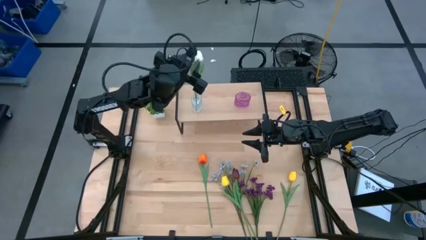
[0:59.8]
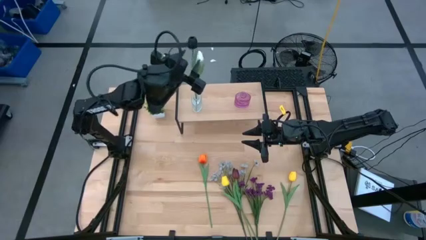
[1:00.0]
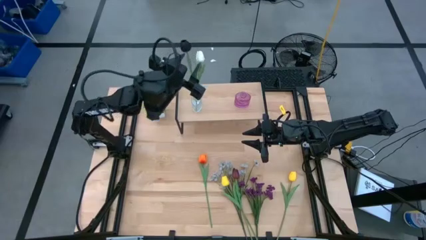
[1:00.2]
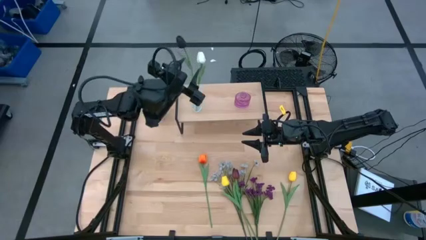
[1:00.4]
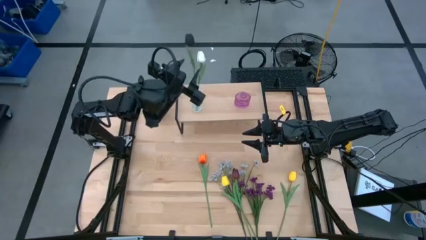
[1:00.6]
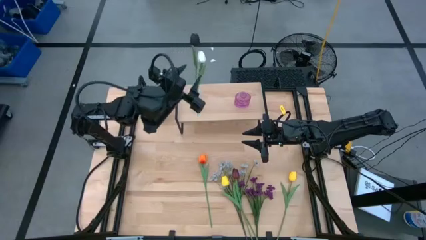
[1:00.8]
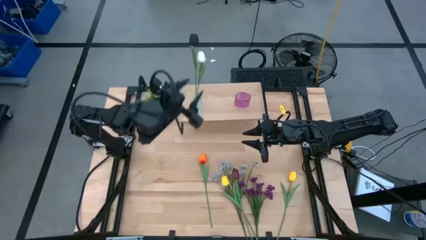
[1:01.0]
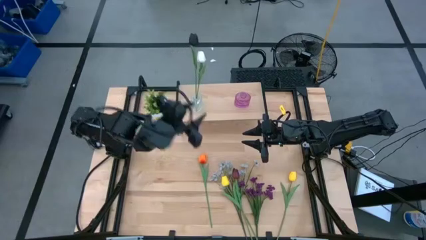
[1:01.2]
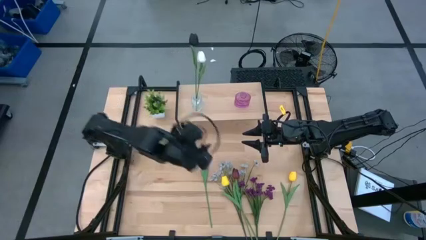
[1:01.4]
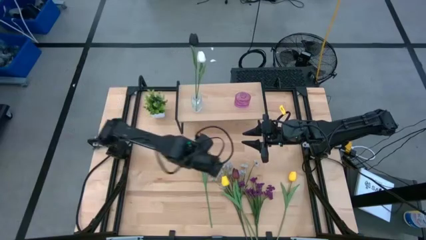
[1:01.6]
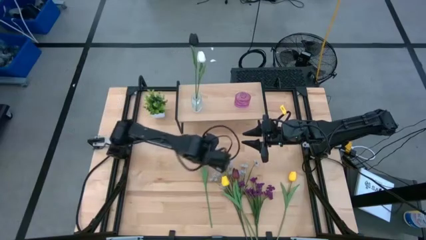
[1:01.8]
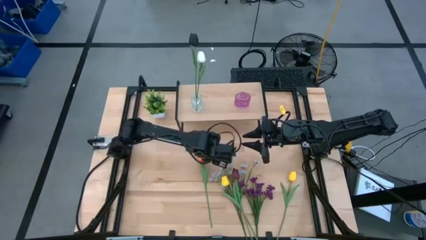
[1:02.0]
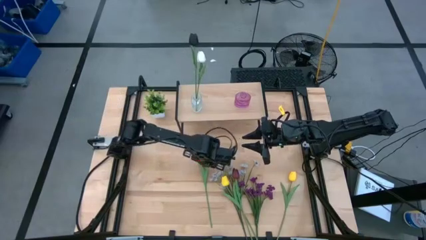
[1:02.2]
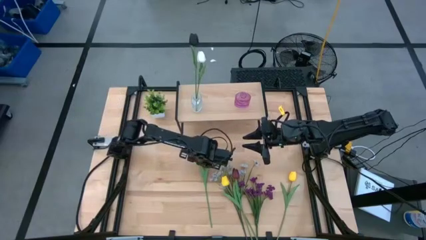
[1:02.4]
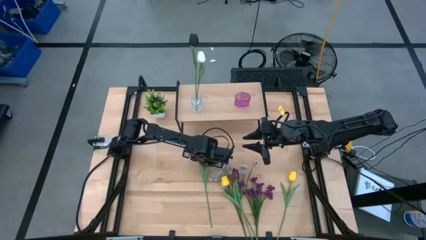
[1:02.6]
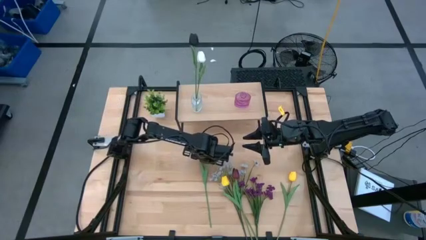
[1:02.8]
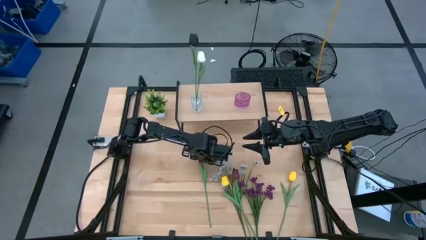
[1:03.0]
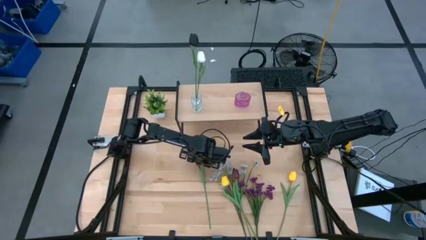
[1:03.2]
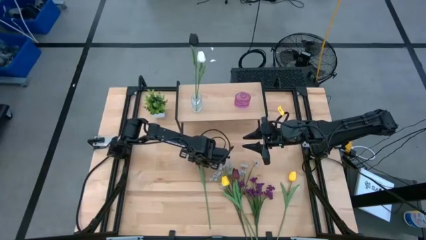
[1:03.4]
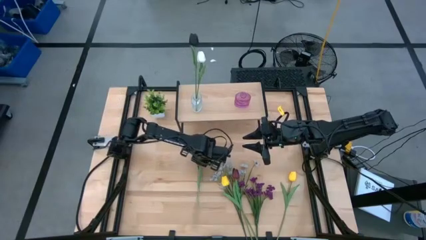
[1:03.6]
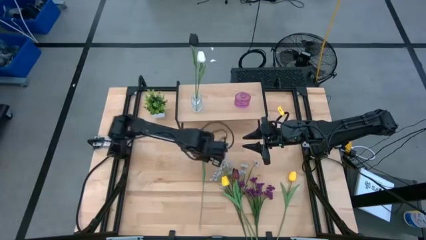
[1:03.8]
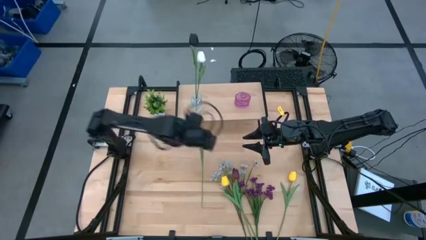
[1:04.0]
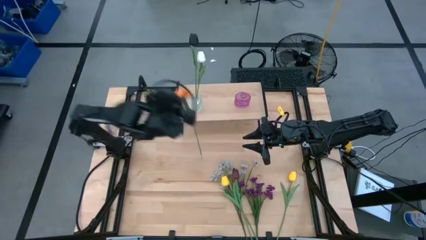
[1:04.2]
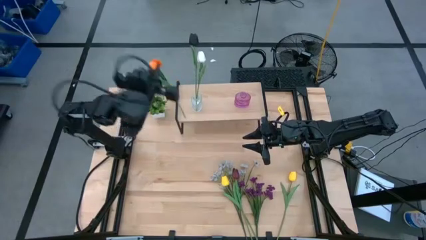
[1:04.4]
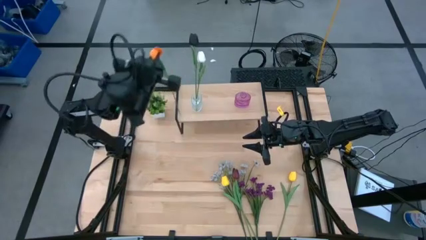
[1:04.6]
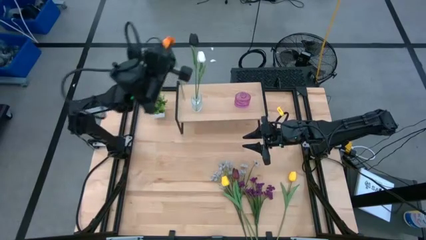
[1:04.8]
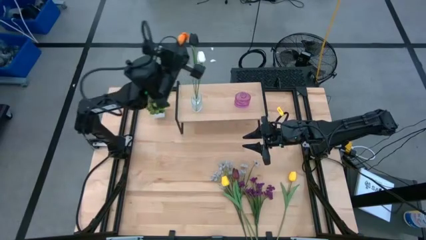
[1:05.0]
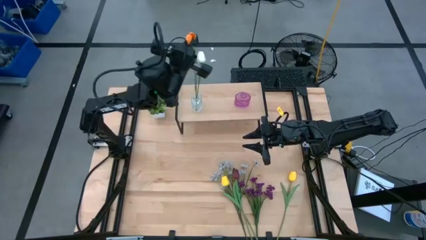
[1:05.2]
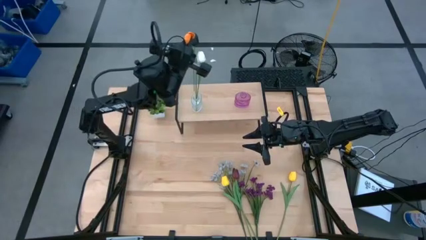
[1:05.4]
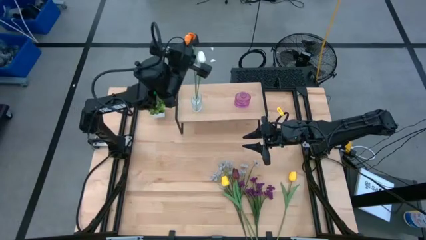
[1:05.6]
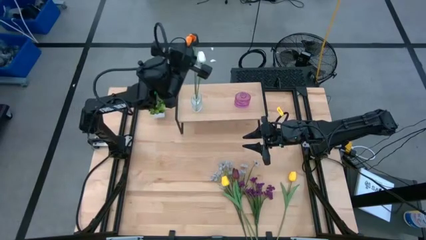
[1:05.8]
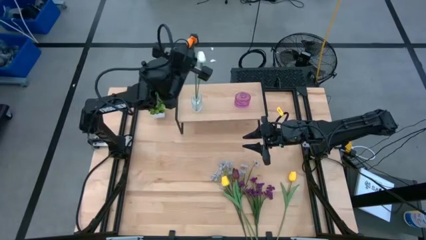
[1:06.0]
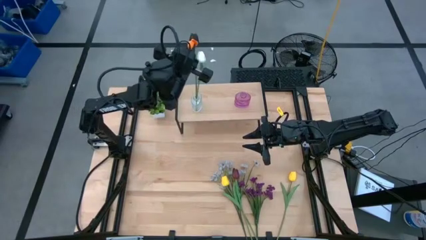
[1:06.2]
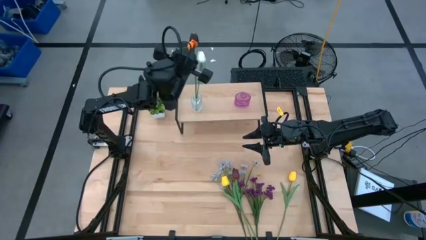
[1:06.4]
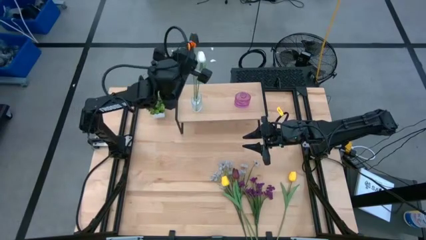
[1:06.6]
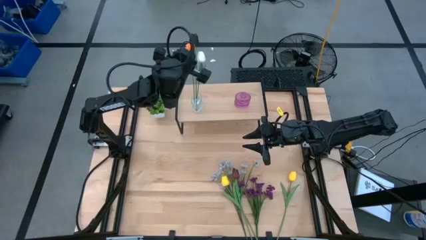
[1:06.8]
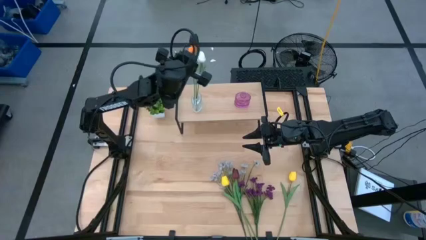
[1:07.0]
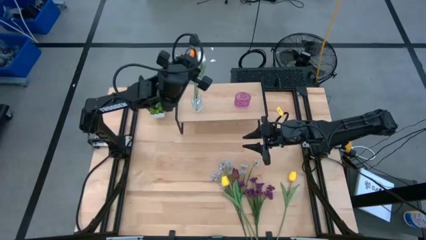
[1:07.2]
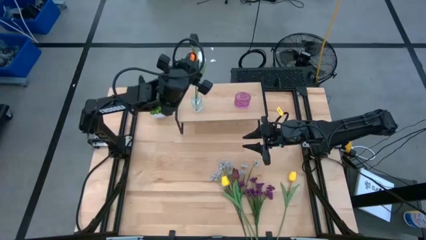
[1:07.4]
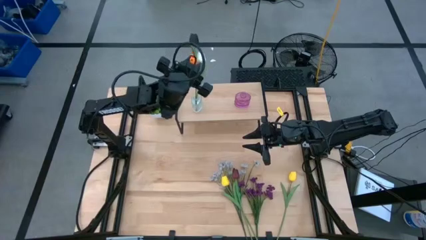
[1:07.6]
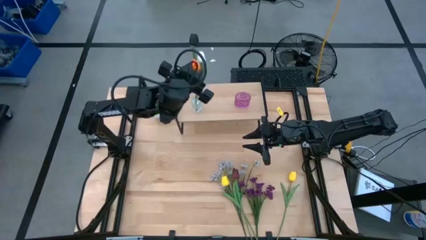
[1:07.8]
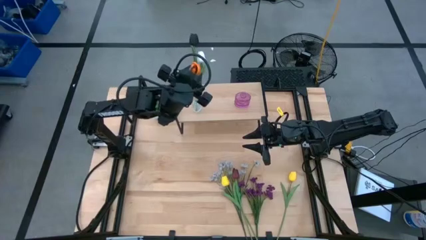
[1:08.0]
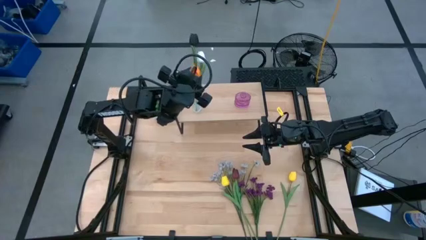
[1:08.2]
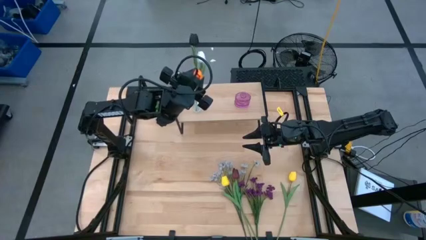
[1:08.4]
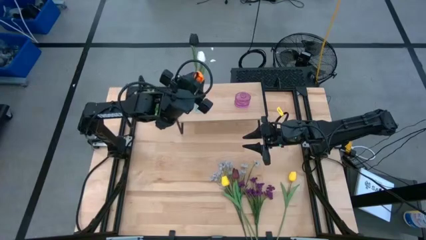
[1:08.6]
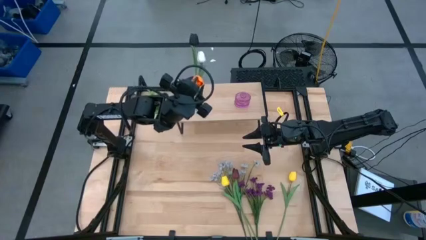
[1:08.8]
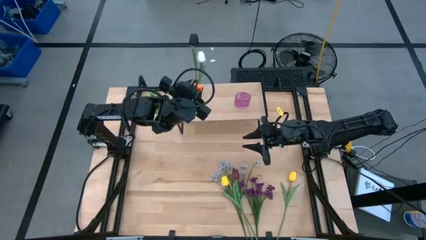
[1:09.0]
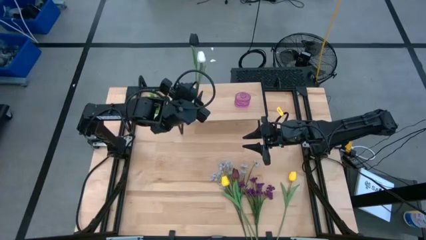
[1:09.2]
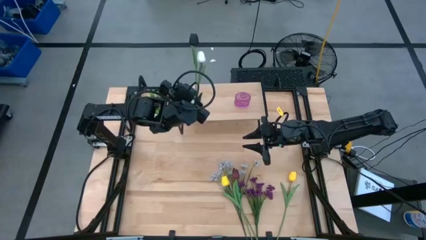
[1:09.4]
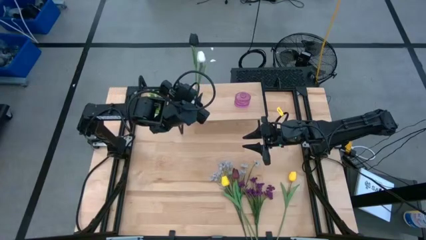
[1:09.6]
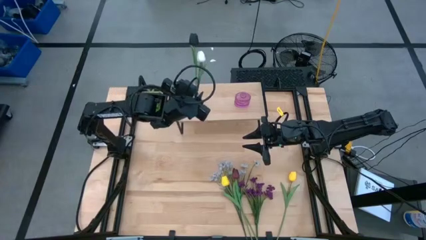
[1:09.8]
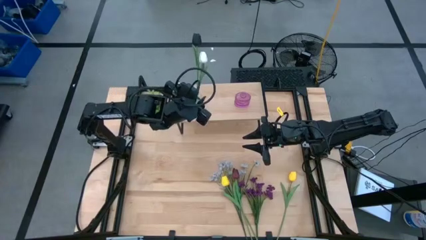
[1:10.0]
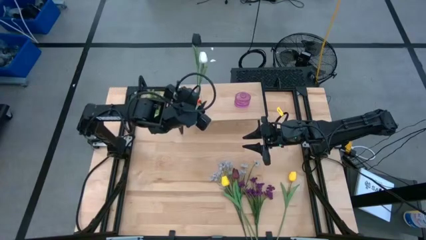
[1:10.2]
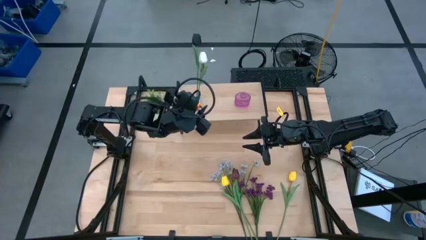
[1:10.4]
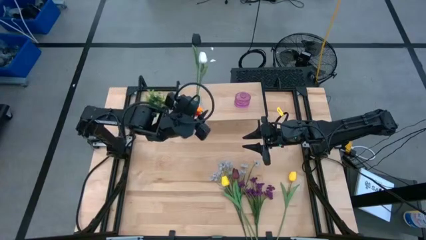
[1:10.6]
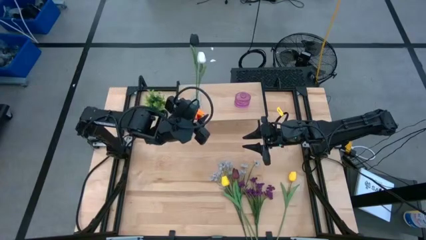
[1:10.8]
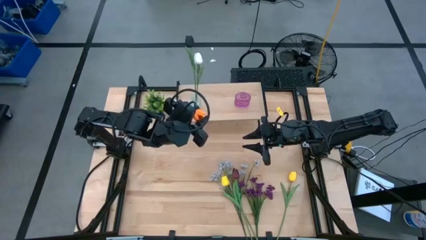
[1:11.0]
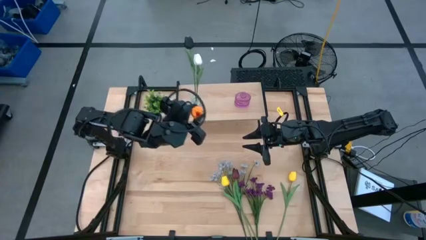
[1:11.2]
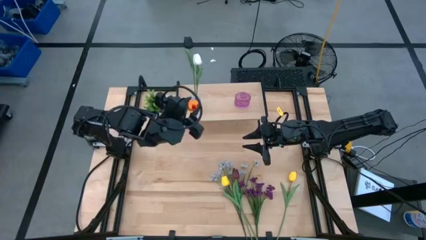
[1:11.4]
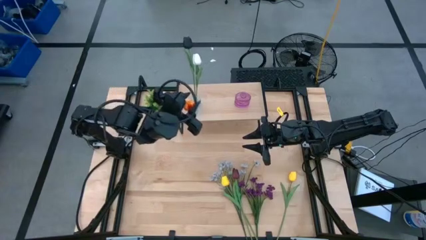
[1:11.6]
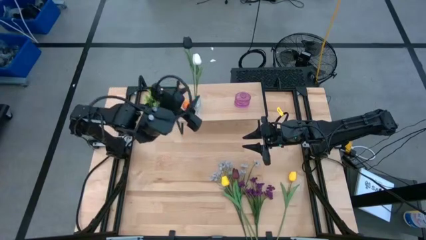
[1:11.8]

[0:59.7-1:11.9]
Task: Pick and place flowers into a vace then onto a shelf
Put the orange tulip into the white vase
